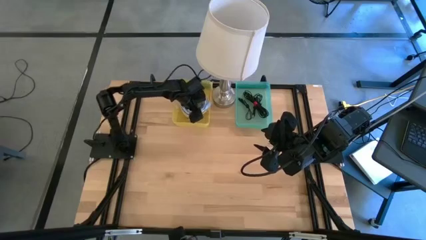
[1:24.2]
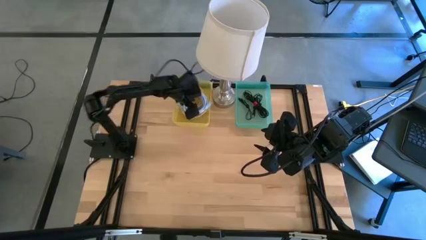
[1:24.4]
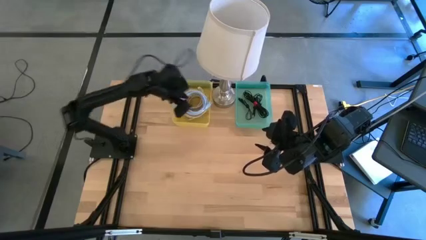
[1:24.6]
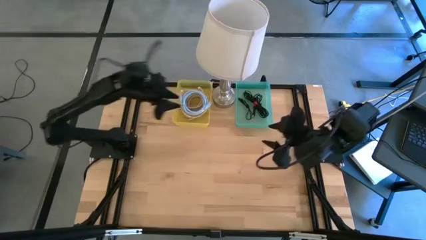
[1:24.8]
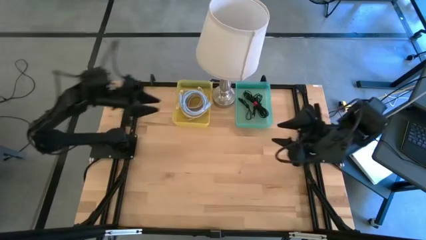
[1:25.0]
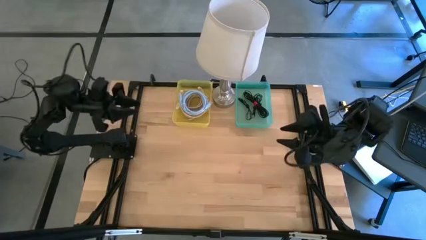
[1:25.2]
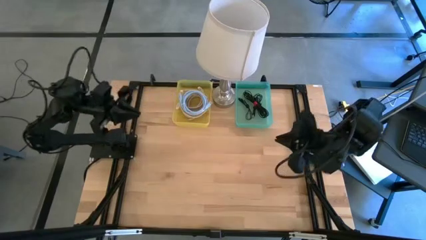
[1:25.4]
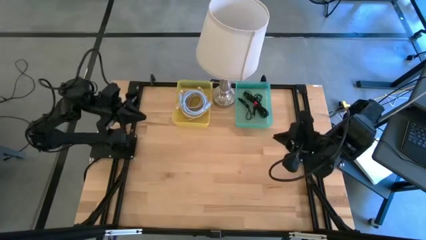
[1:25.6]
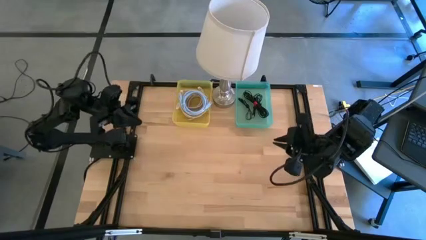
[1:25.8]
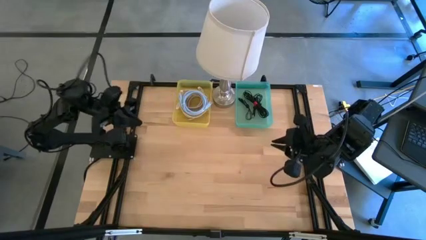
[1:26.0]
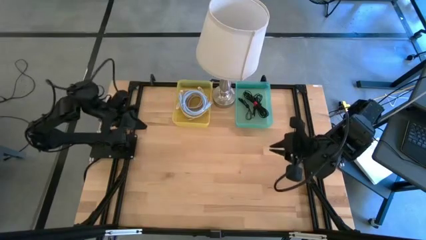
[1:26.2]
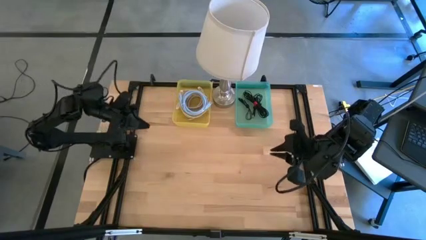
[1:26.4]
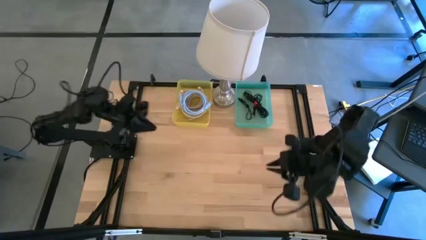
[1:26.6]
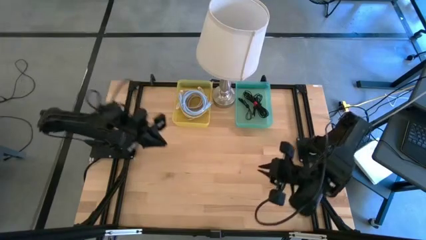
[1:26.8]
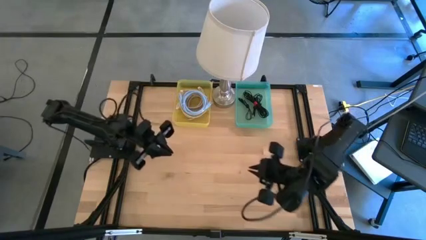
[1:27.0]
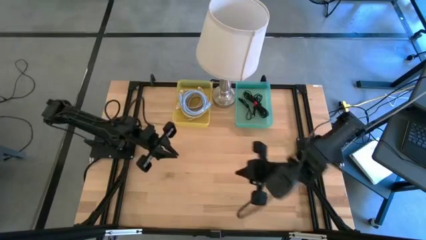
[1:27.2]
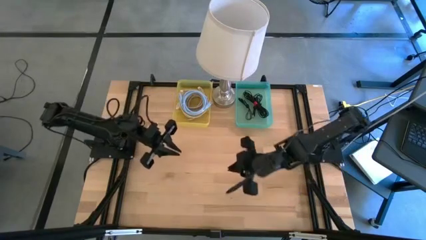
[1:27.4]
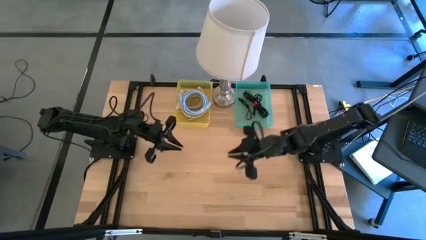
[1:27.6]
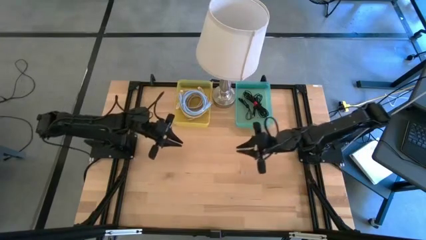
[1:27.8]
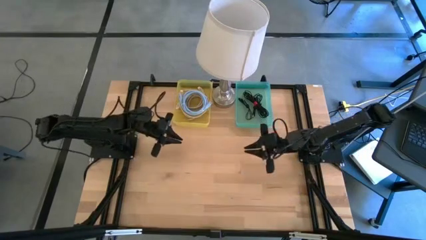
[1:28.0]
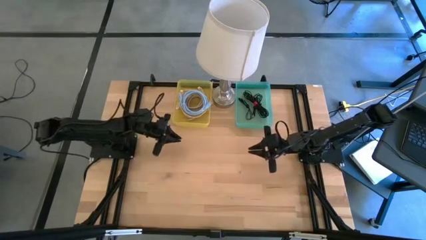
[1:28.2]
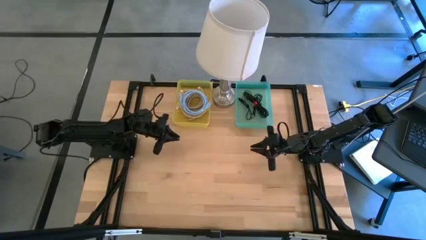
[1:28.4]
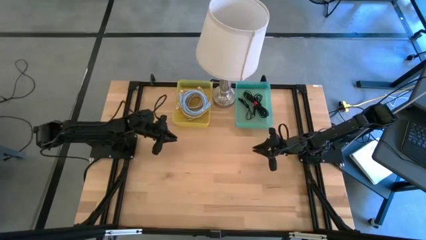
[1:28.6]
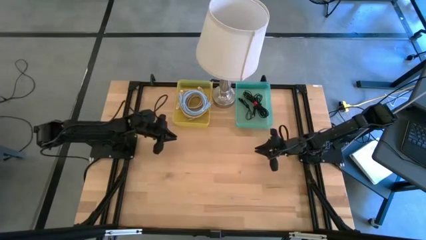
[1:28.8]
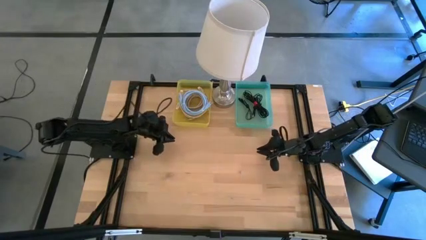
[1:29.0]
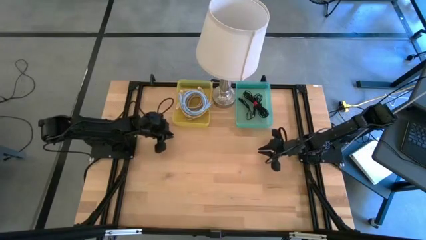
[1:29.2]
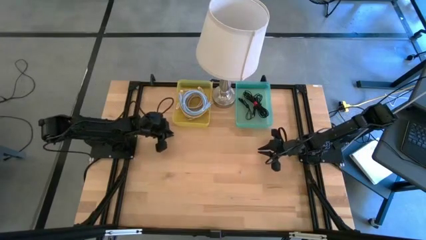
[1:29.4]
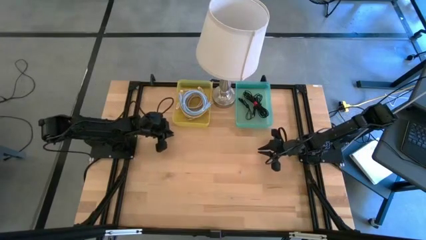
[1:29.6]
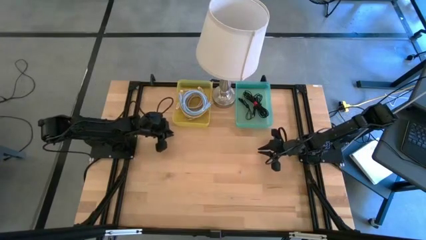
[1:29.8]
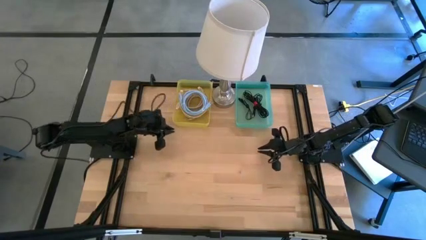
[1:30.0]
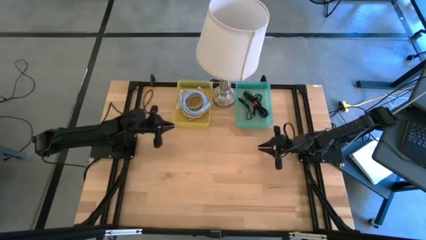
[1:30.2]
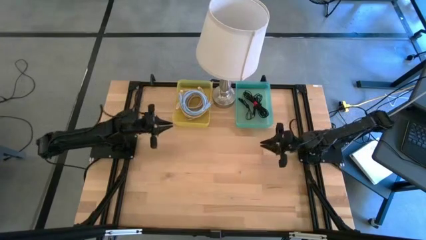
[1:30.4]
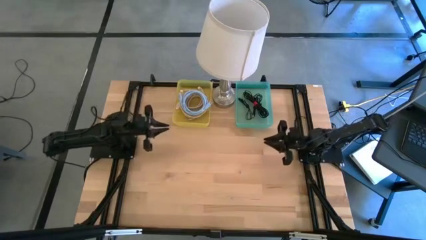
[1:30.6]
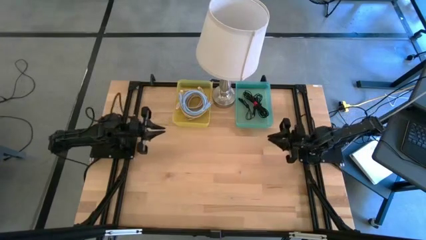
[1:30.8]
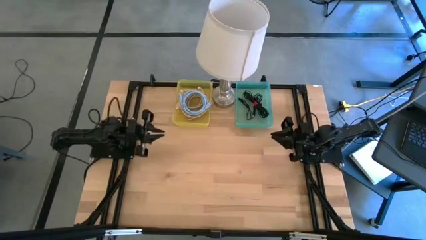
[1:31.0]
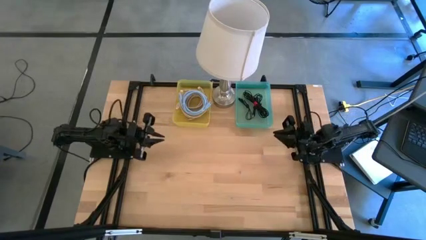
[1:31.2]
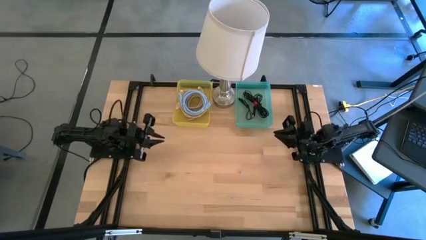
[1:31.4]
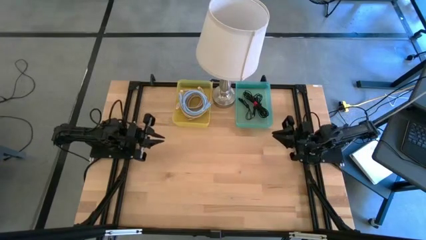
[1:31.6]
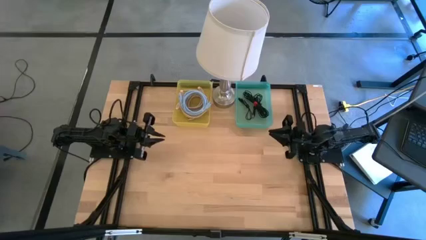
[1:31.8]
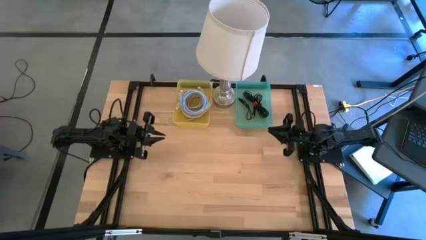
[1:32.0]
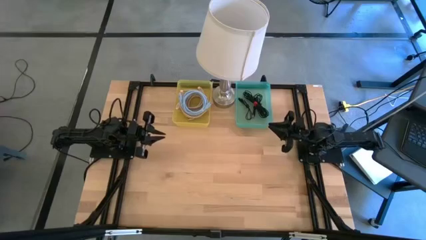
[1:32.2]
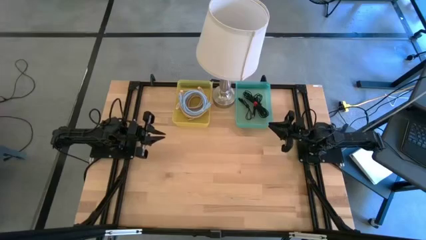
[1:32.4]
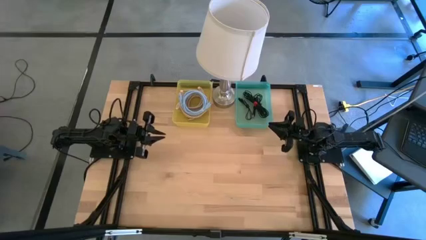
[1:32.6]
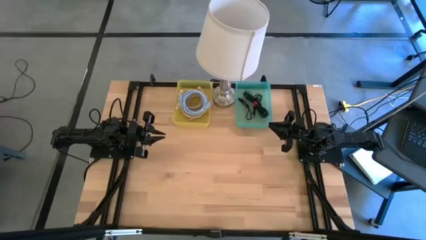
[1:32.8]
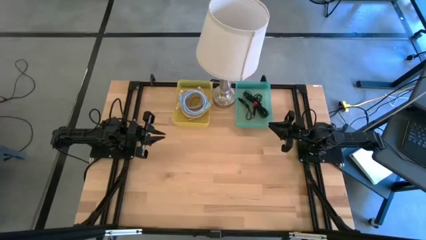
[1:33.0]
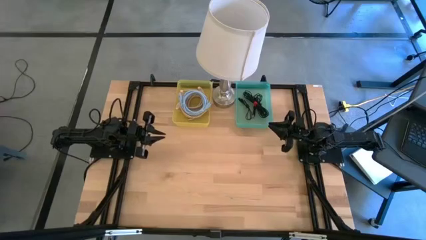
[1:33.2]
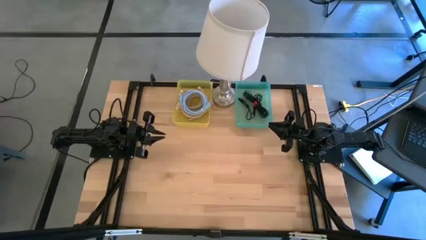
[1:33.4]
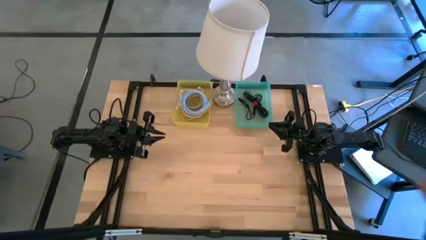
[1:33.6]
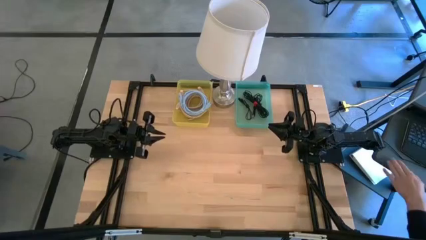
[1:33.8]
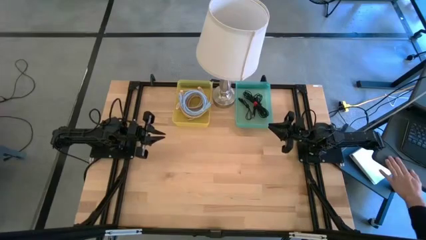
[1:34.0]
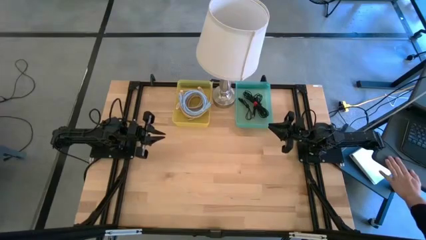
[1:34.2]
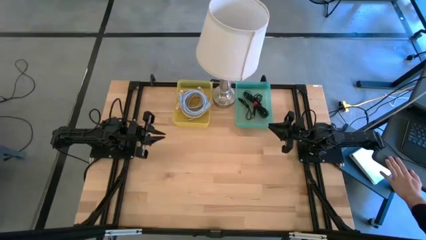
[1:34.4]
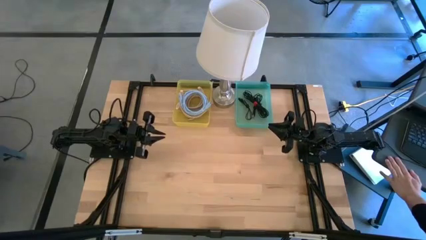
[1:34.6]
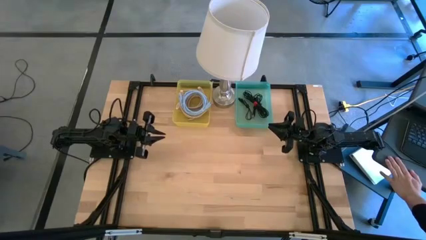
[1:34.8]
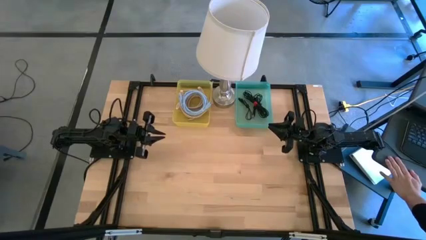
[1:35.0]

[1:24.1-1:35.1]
Return to Home Position

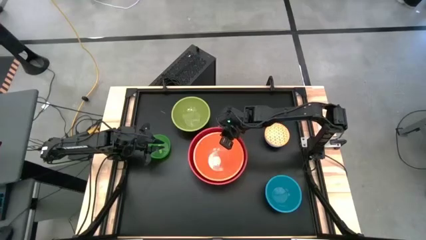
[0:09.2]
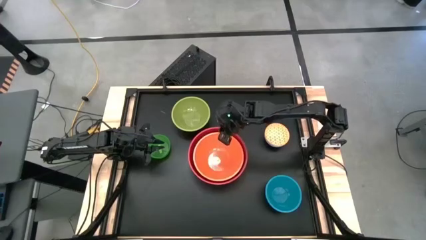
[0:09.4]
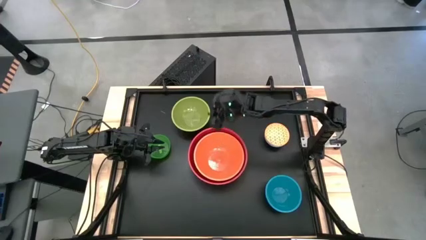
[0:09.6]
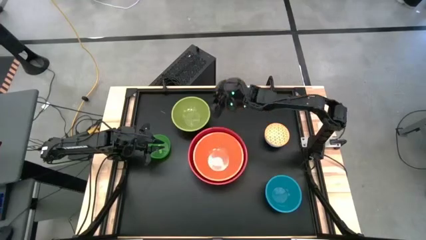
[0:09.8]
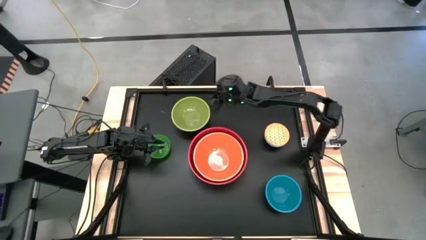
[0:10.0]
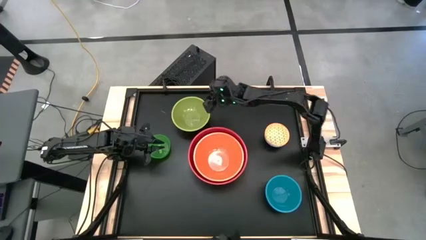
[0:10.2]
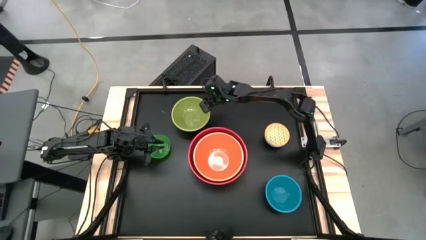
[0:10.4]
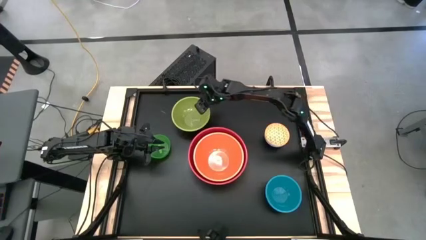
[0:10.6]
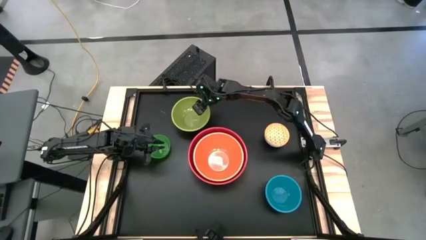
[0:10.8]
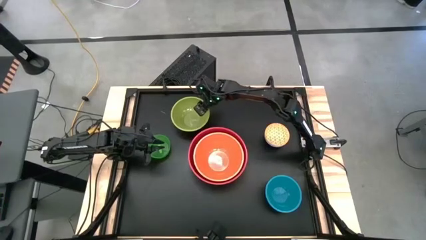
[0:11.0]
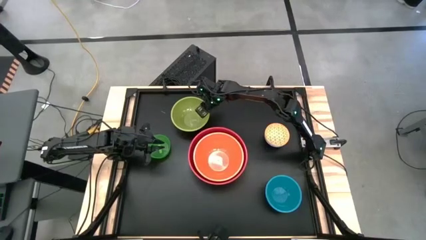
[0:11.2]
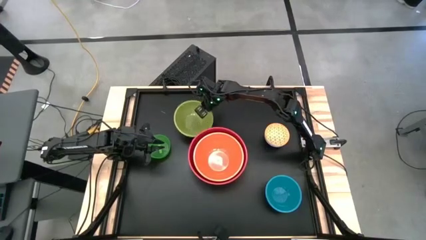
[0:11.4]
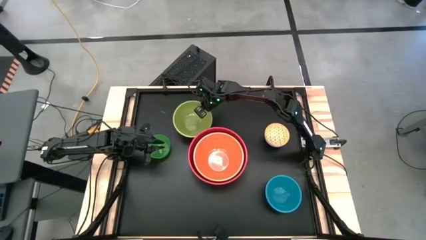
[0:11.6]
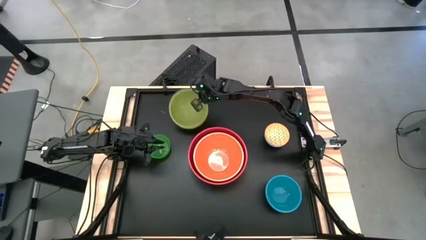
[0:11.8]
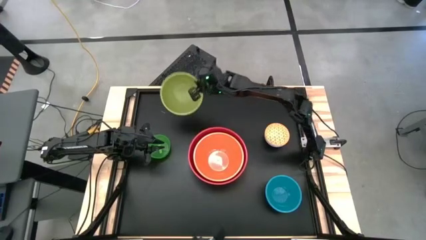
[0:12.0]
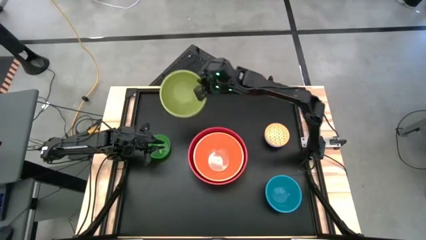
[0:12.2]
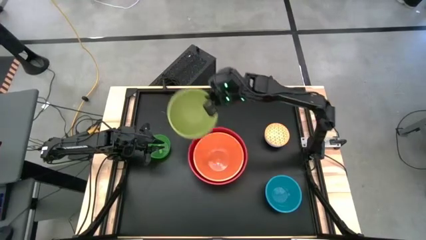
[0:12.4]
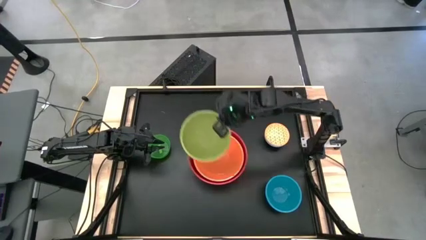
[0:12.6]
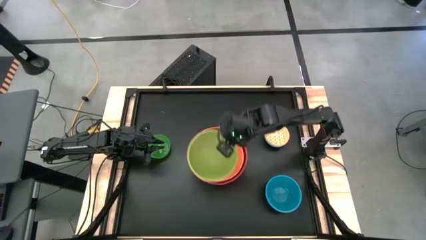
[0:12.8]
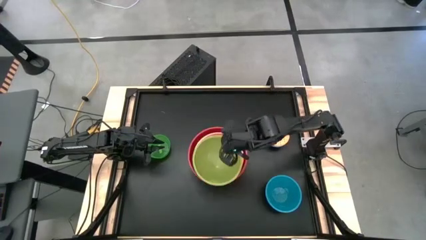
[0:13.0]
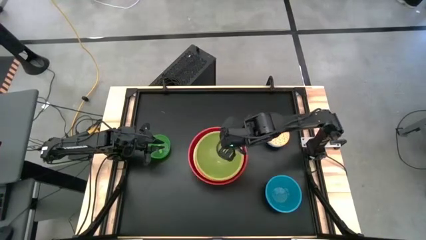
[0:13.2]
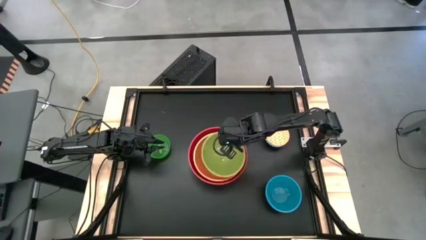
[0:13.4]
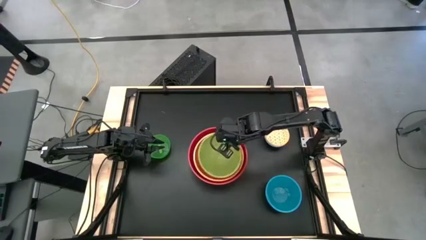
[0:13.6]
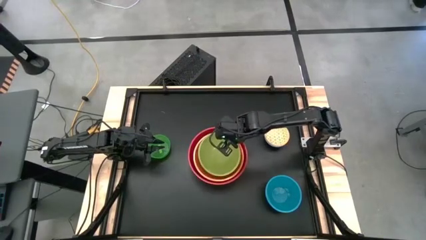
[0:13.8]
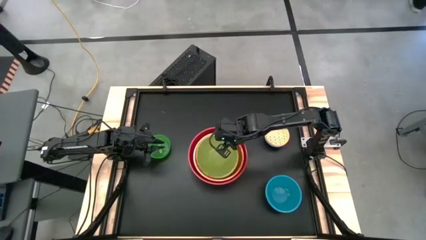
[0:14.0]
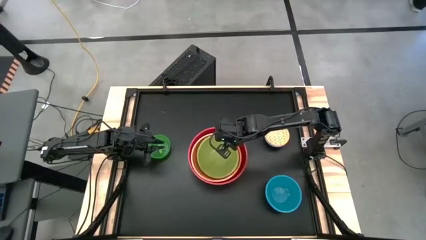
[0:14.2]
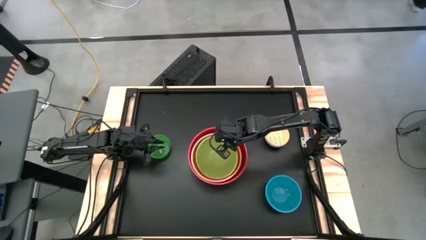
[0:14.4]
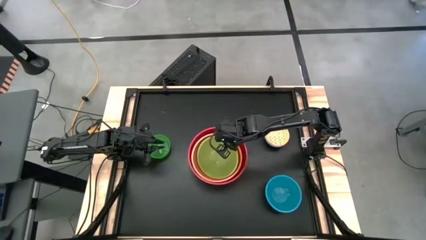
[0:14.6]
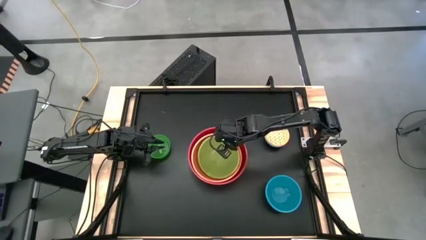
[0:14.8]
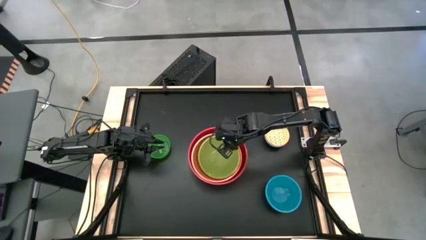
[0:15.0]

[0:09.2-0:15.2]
Stack the light green bowl on top of the orange bowl
